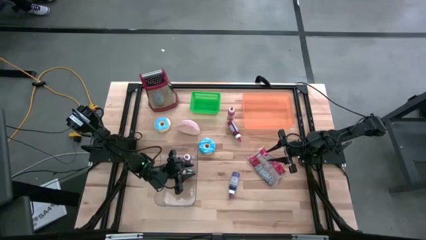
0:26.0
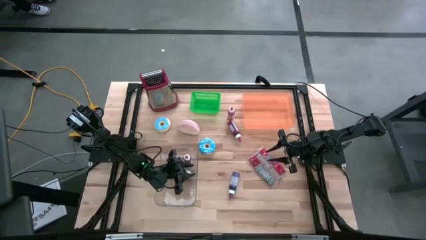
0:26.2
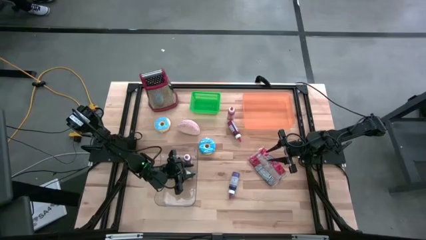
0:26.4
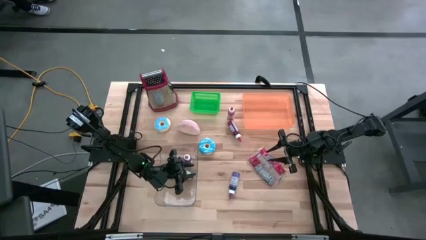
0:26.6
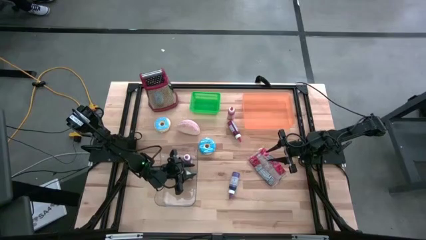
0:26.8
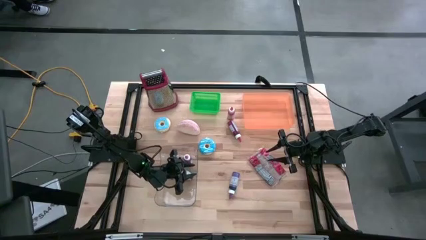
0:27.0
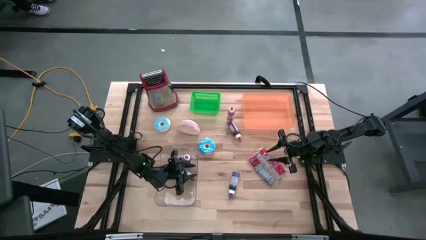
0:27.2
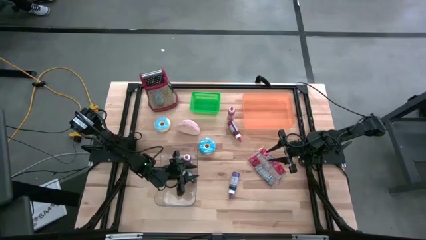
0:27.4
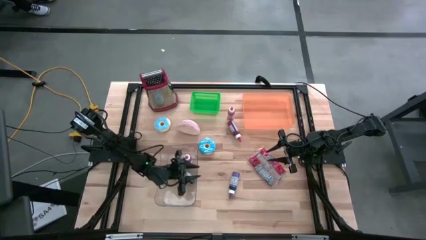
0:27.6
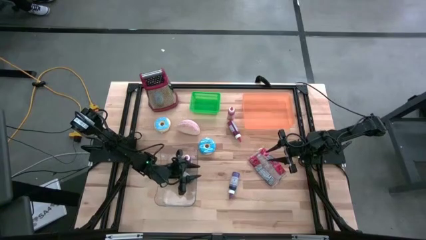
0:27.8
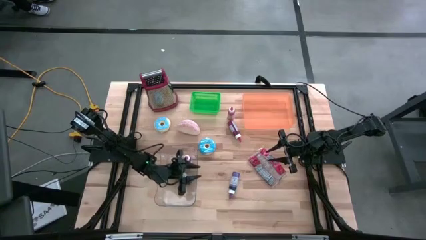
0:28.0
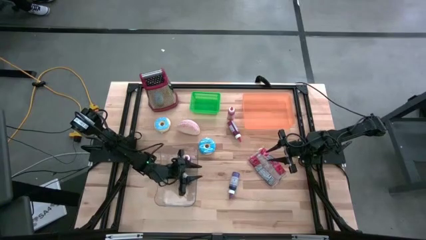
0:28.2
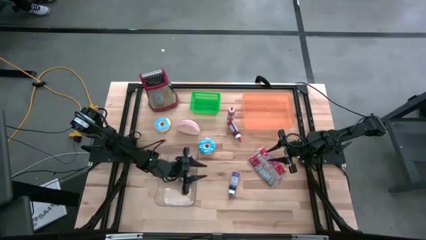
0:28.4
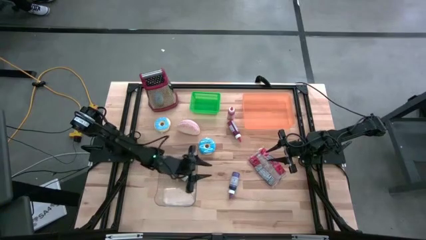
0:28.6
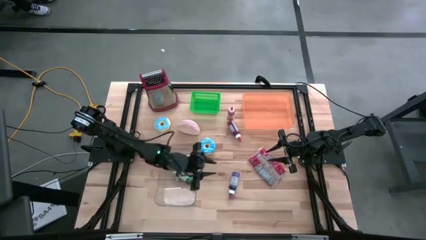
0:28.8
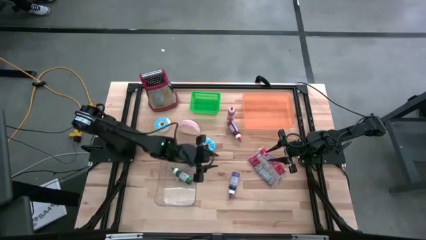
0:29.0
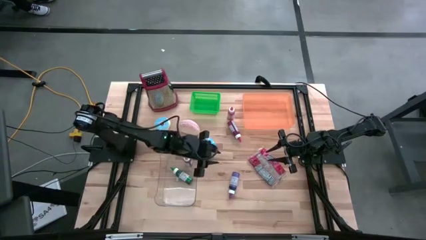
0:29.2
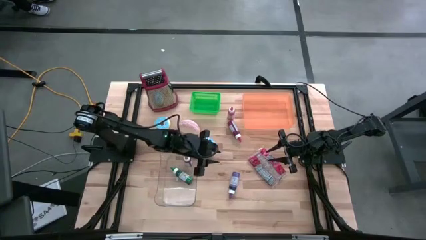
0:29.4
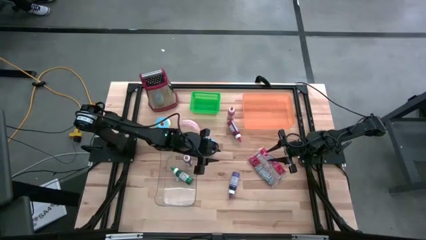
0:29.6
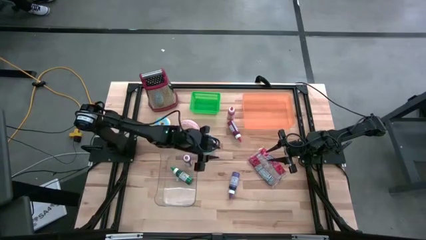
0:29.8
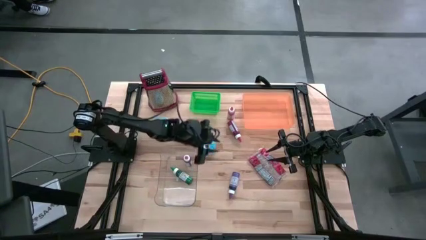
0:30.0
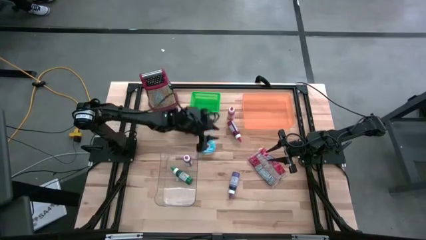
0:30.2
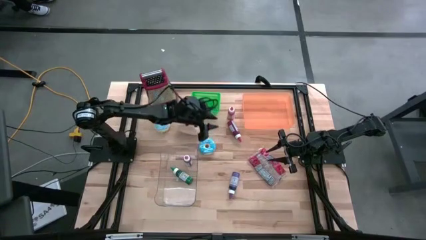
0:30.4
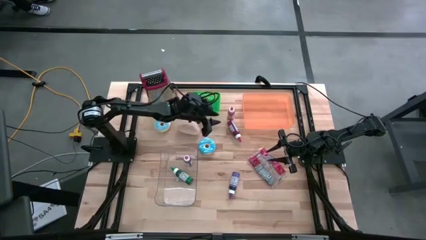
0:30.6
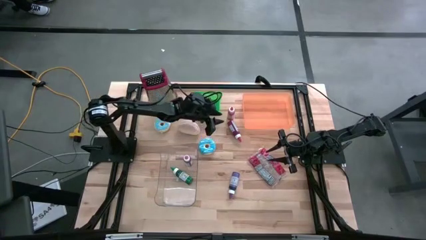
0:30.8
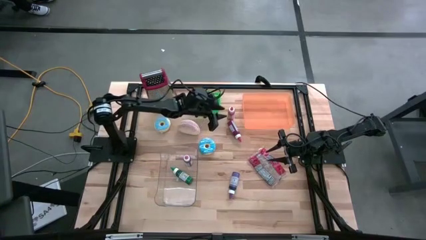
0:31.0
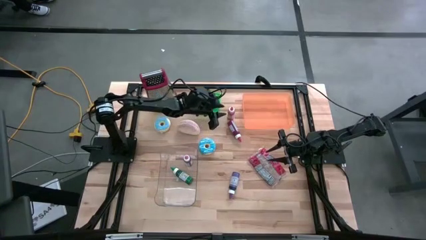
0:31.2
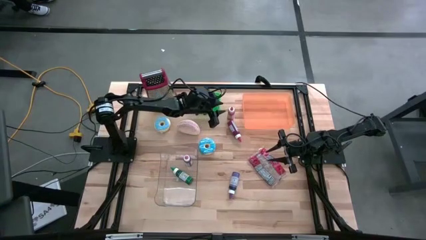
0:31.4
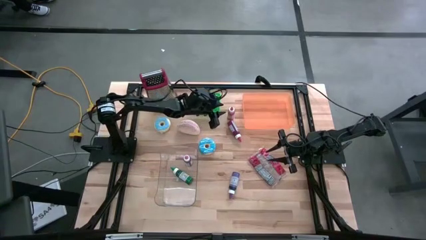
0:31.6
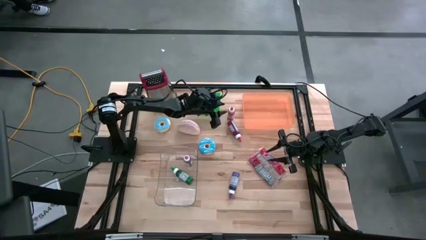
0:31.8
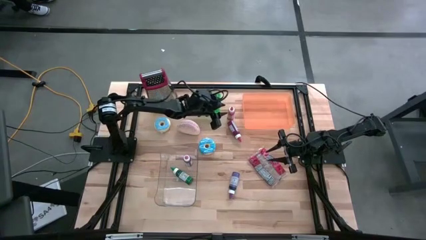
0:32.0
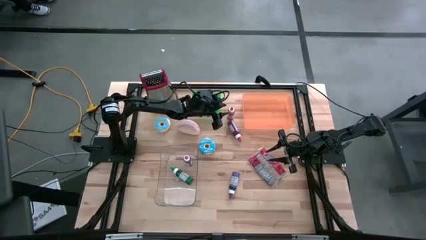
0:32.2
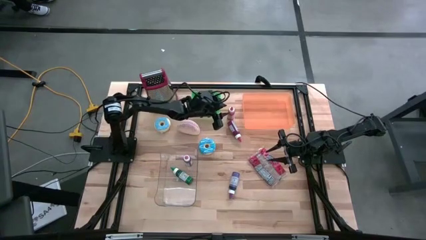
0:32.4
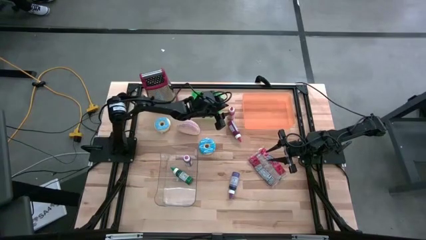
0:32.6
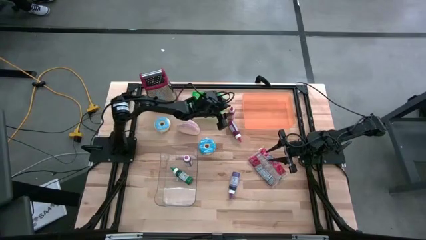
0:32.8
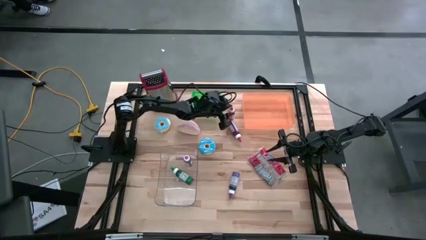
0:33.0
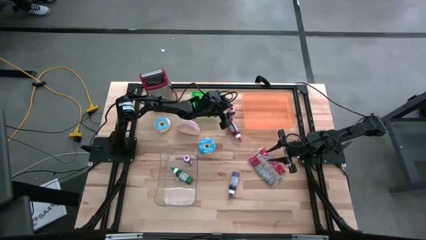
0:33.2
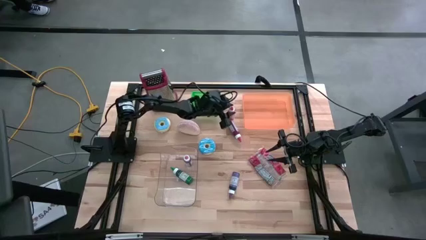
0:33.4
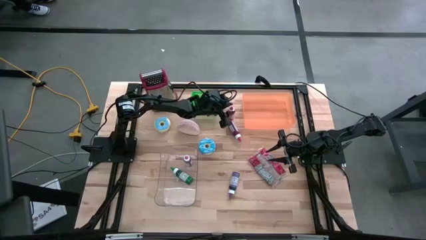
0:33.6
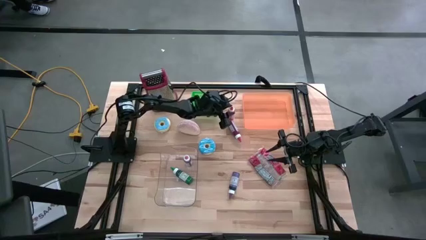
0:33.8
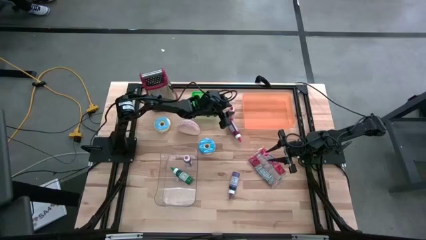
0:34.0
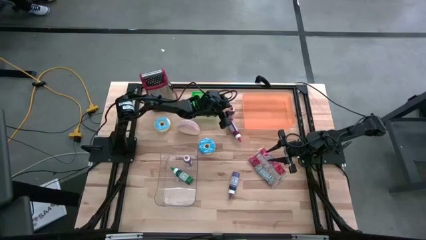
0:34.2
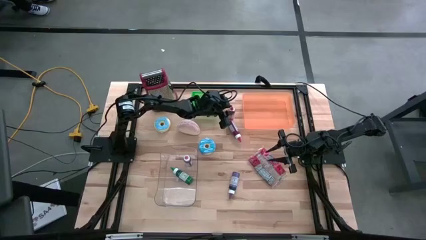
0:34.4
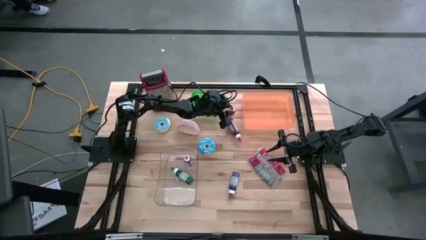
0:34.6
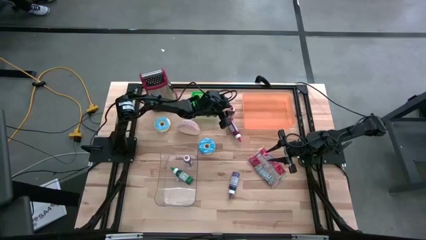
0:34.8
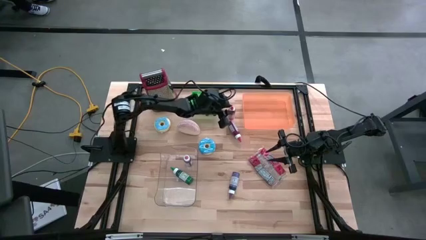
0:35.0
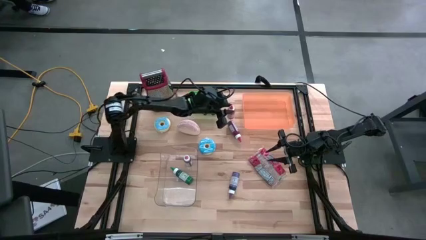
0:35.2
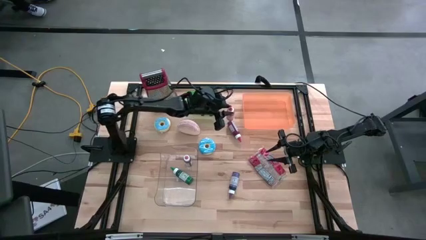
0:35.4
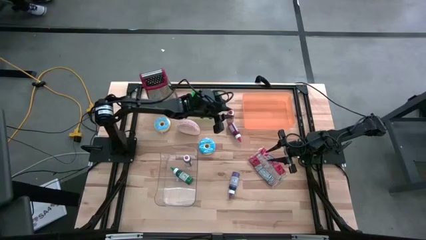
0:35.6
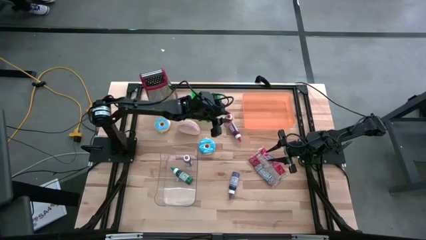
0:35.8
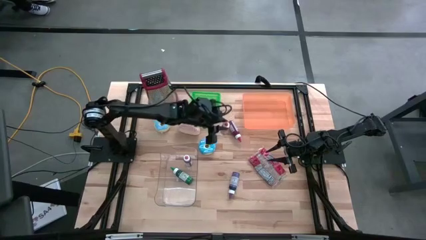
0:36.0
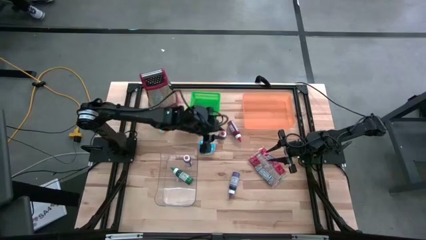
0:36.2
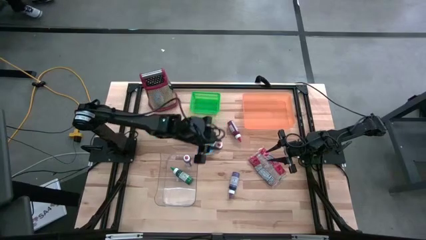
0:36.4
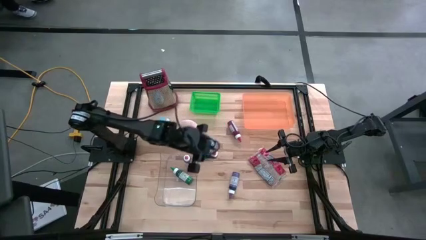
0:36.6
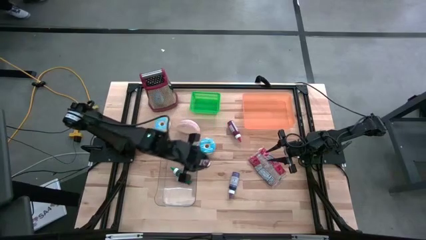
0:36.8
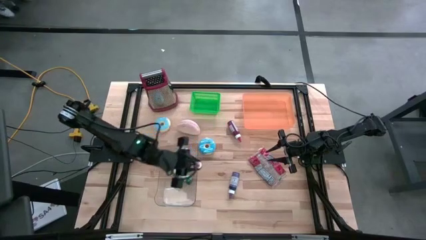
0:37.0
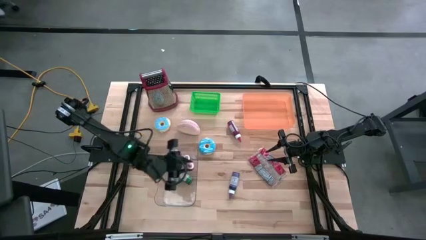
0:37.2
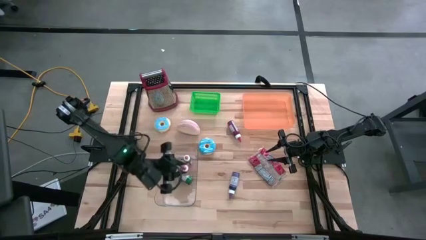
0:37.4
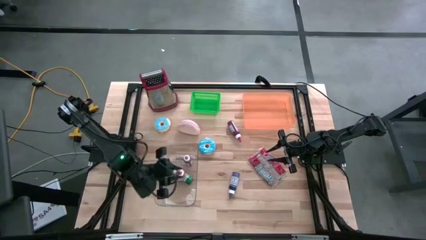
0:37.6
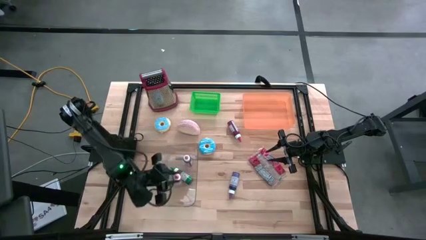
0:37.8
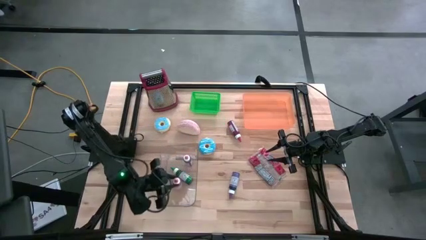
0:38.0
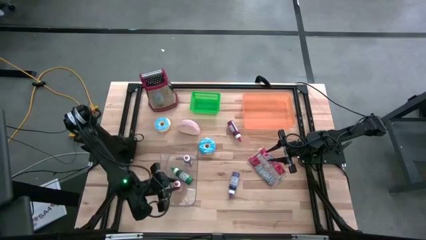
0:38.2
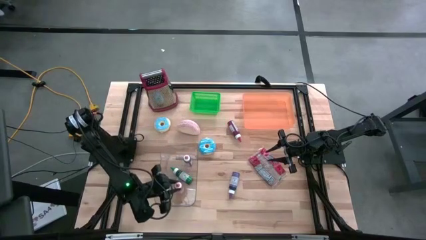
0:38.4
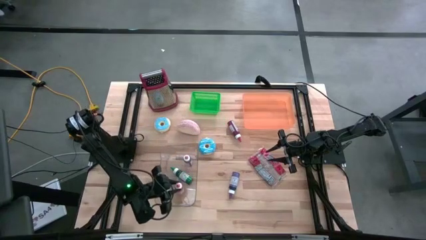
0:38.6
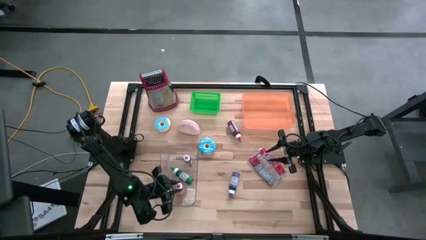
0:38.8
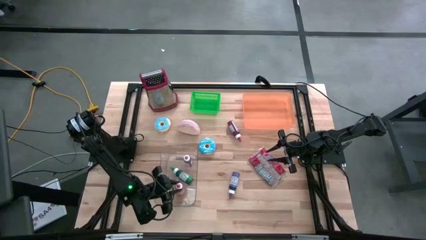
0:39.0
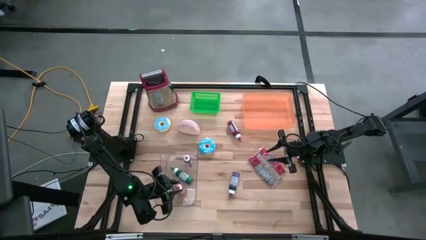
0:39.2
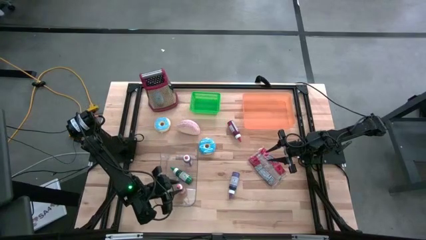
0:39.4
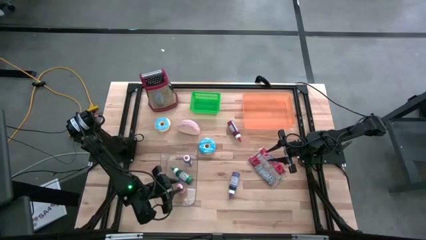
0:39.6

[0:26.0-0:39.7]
Put the orange food coloring bottle into the transparent bin
